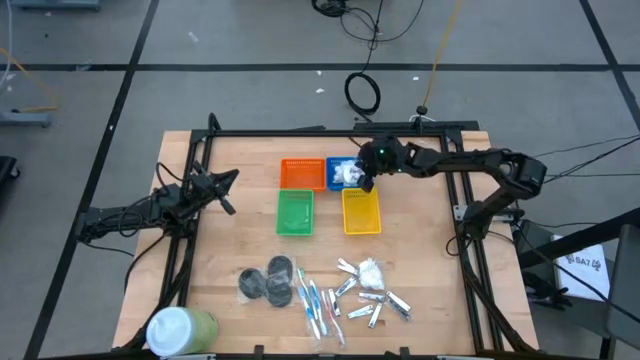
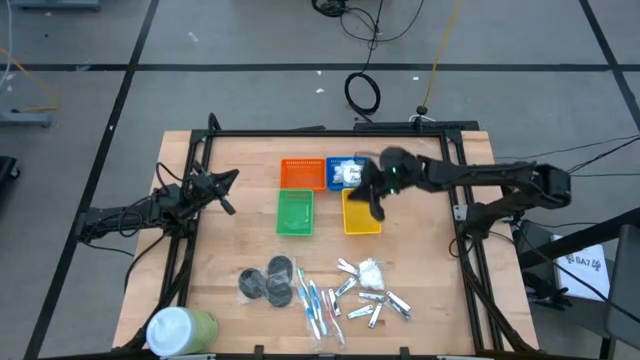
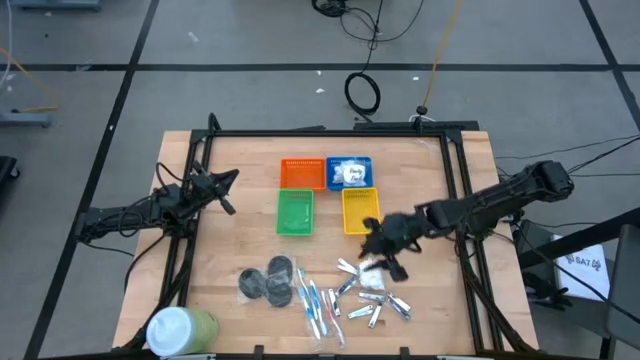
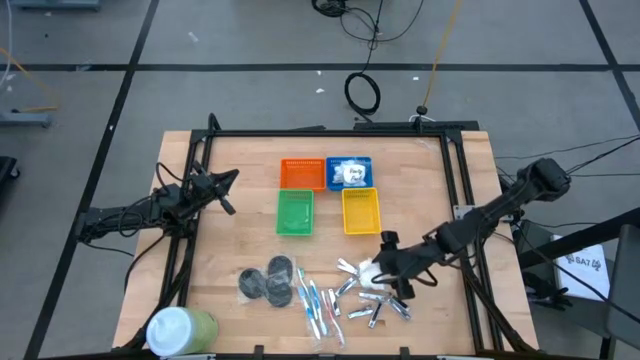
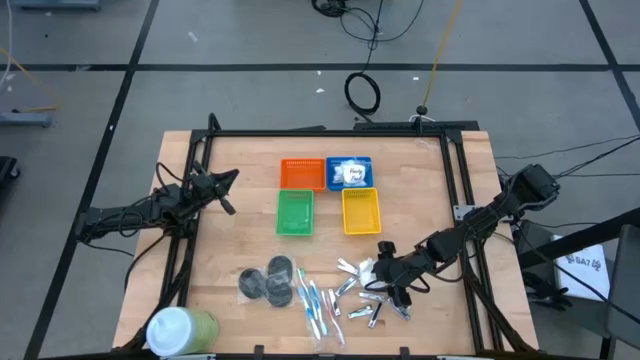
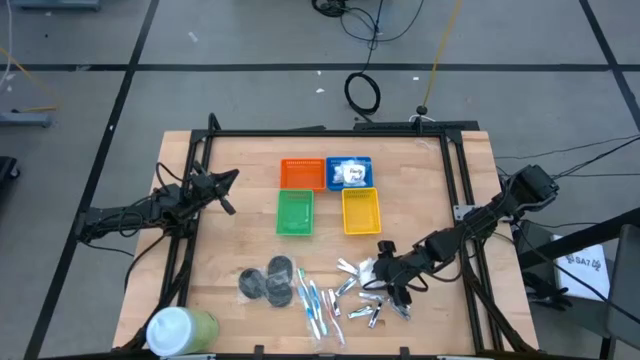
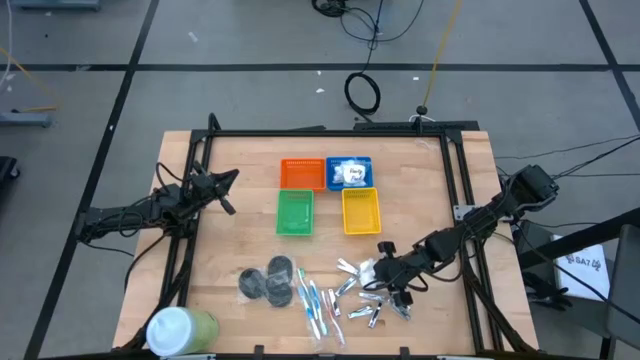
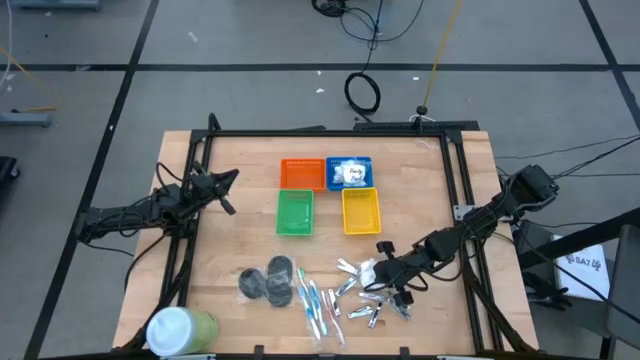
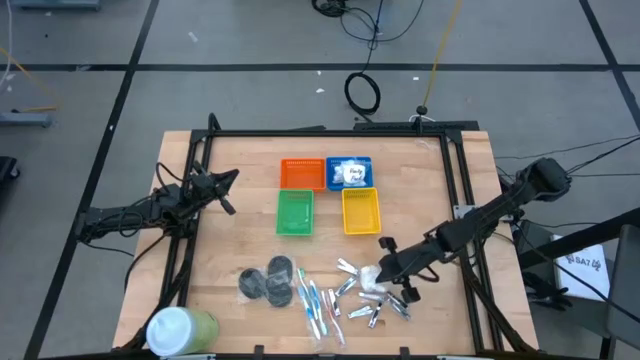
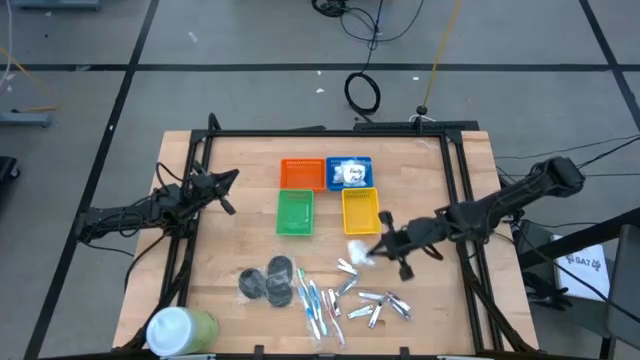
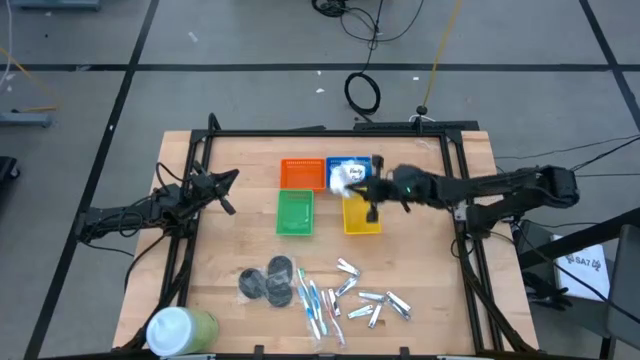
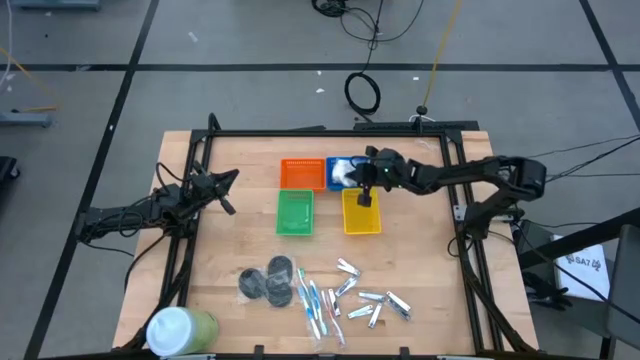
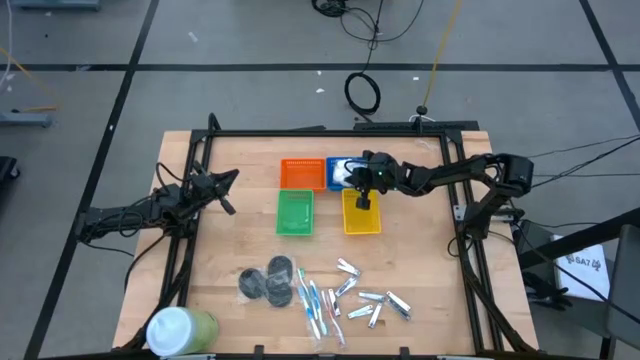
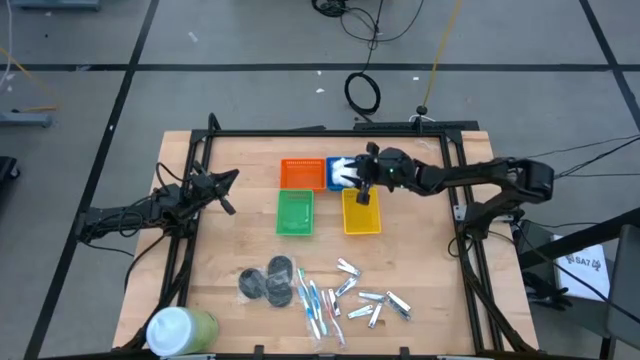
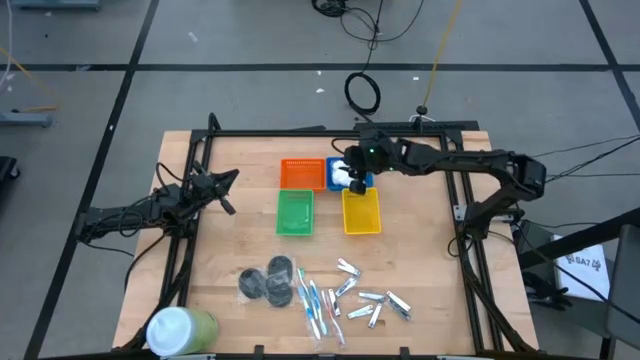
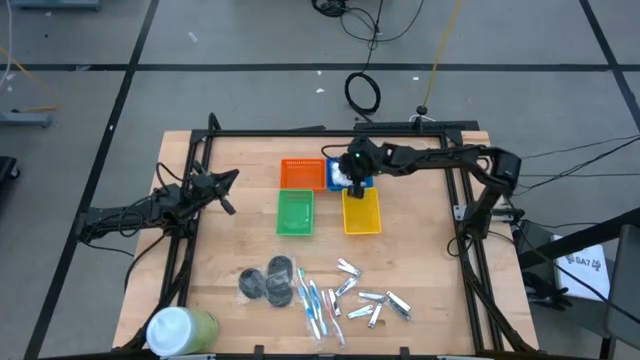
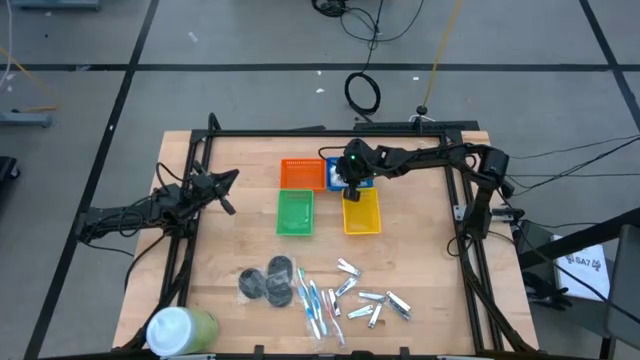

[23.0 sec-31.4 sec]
Task: Pick & Place Travel size toiletries
Put the white vanity pack into the blue bin

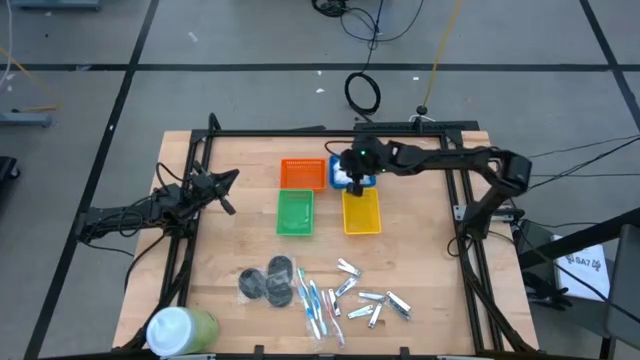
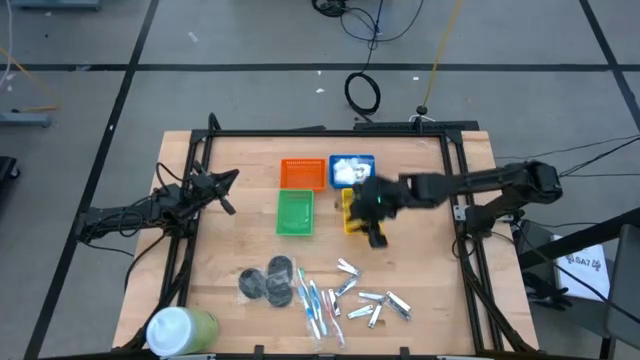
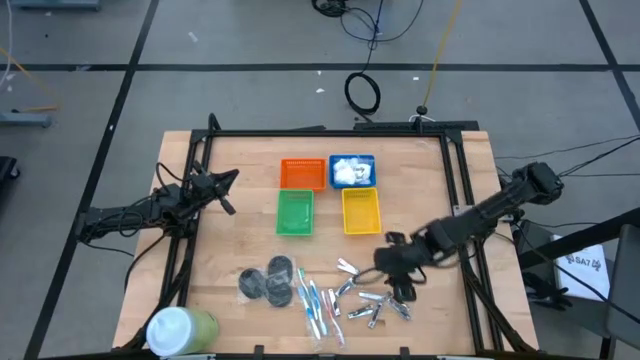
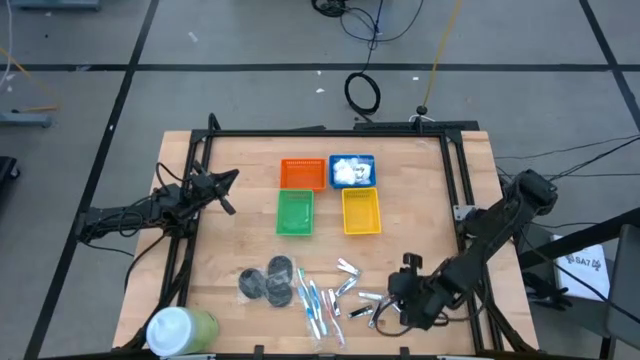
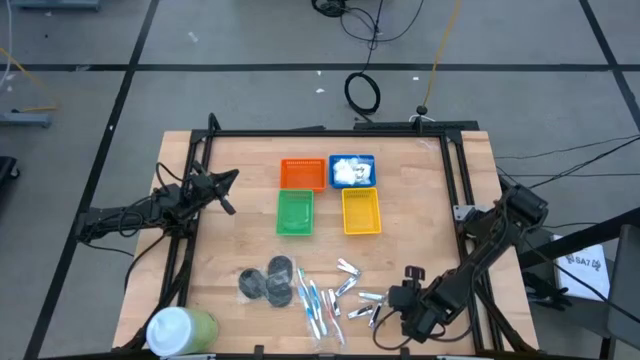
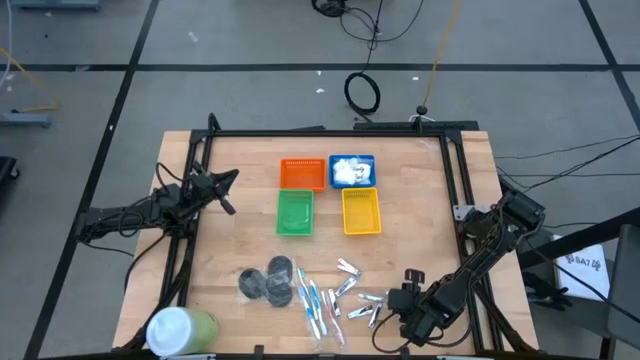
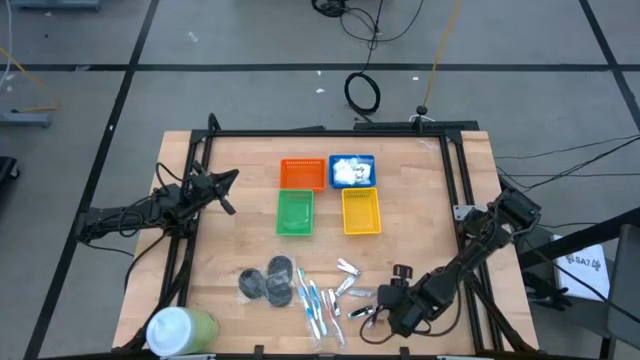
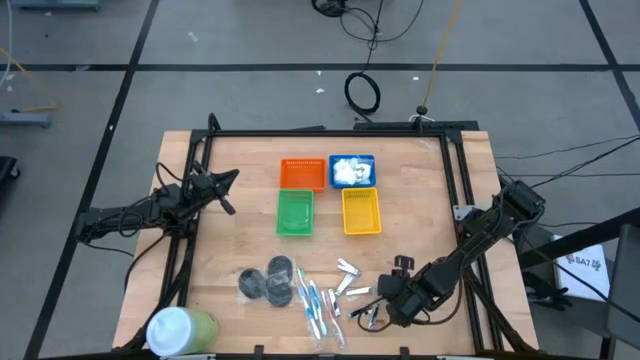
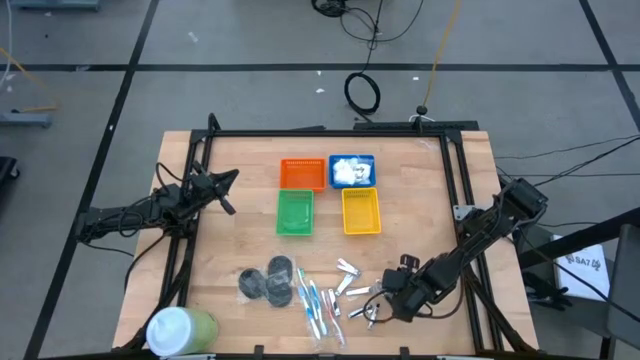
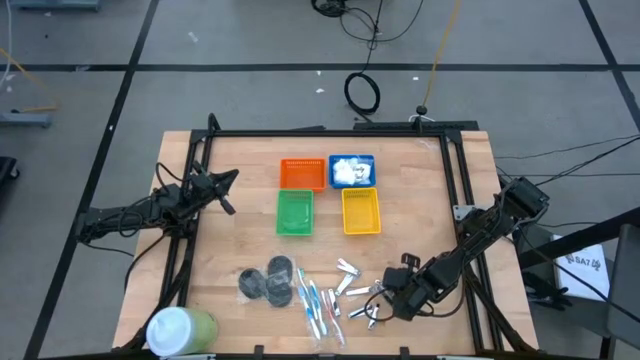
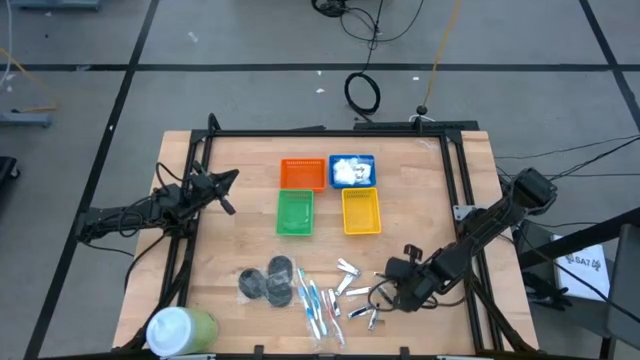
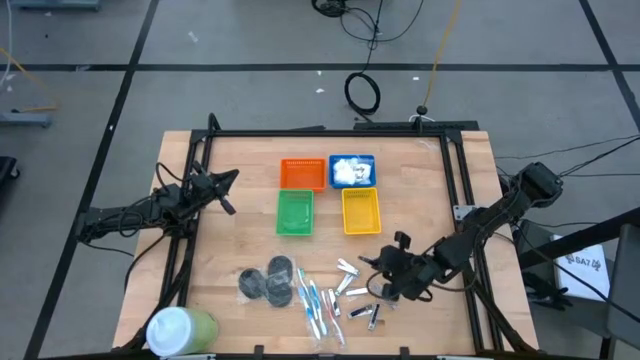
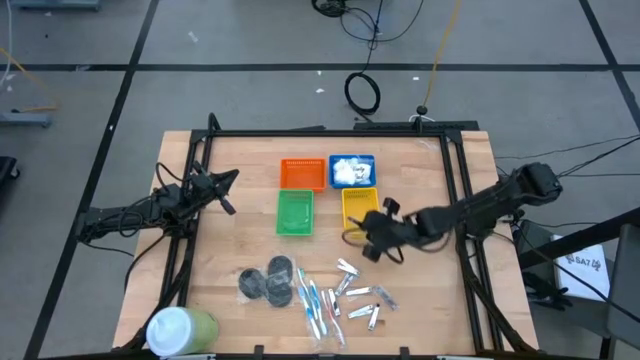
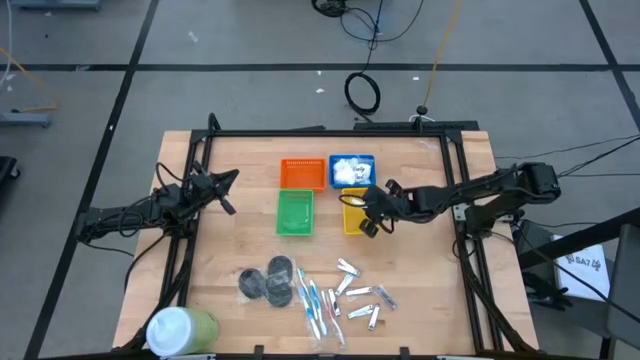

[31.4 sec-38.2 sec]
Put the silver nail cutter into the yellow bin

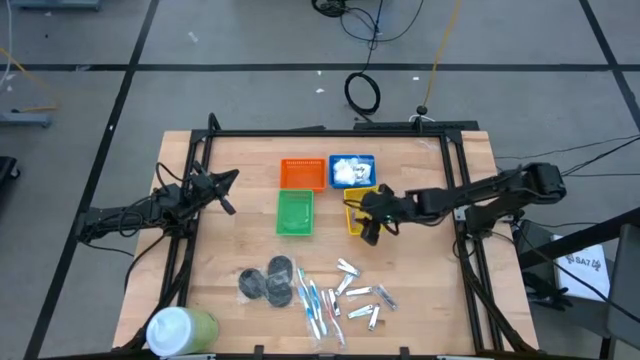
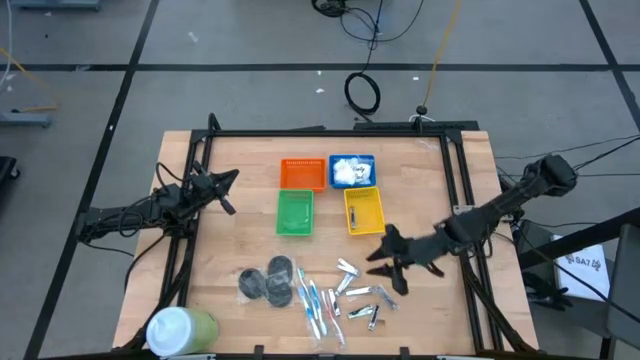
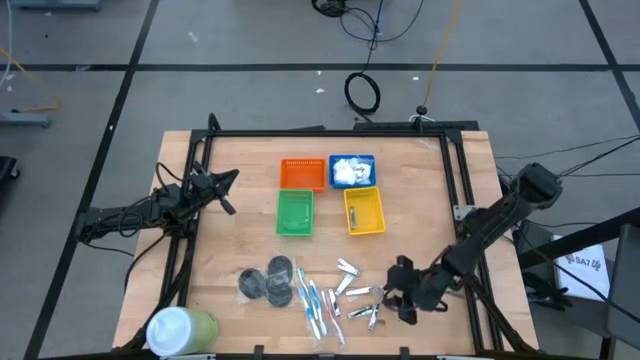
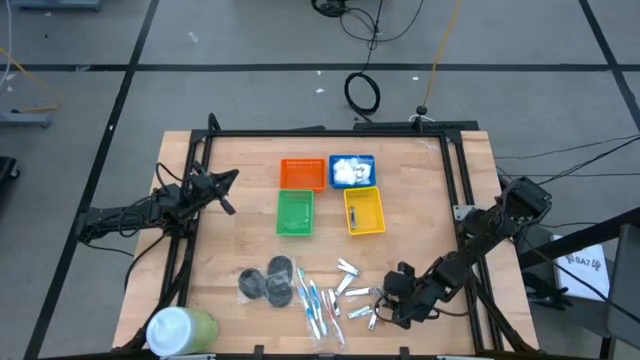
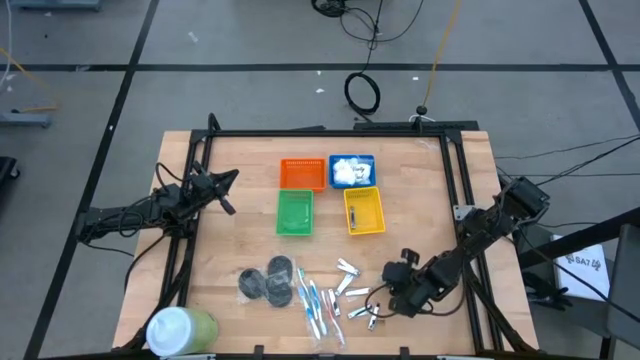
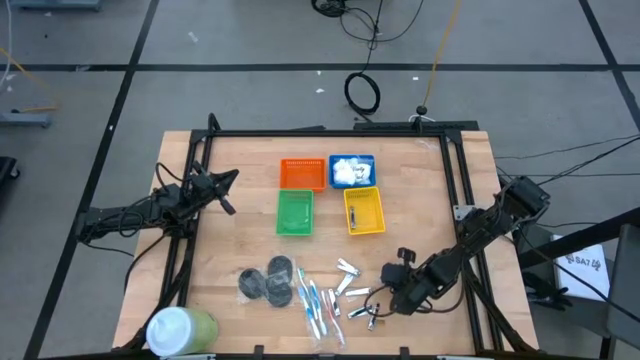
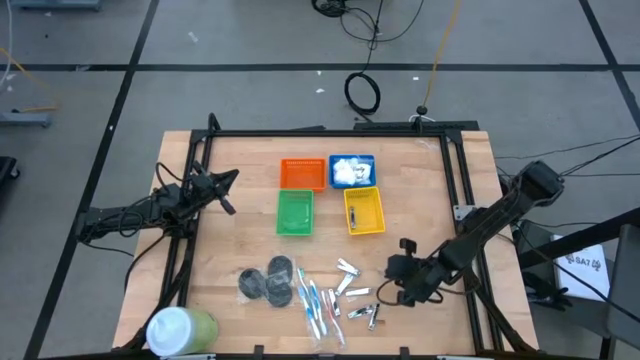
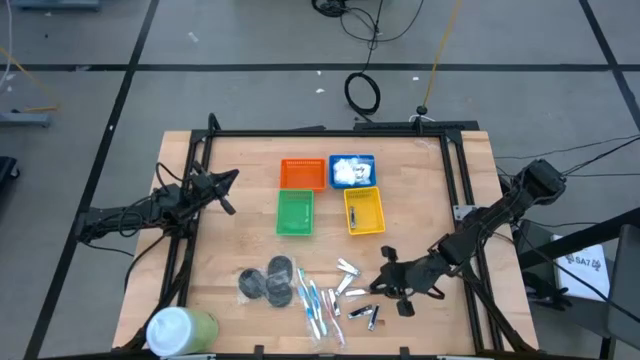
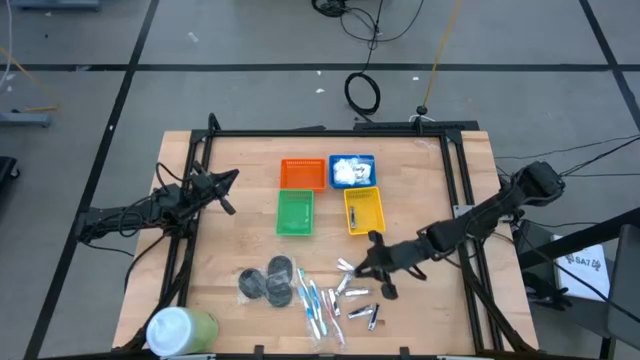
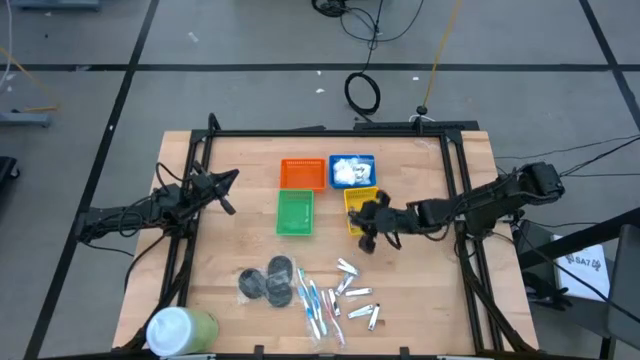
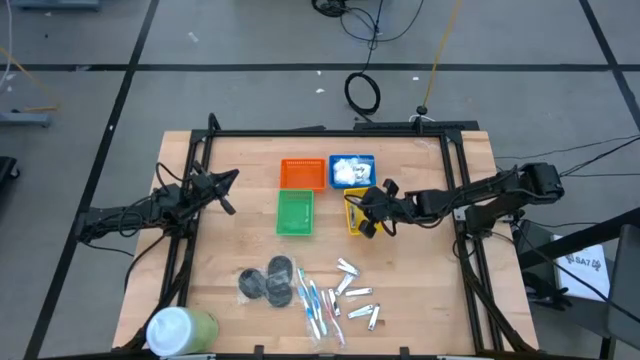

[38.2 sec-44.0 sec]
Put the silver nail cutter into the yellow bin

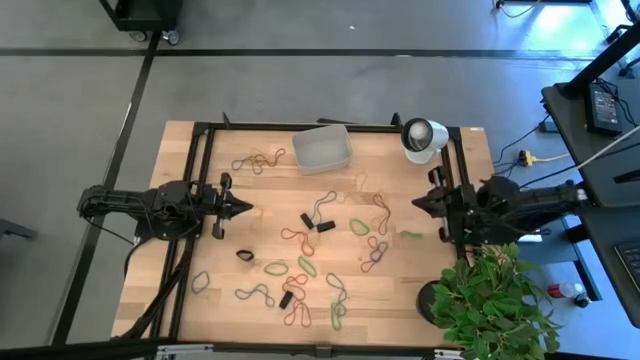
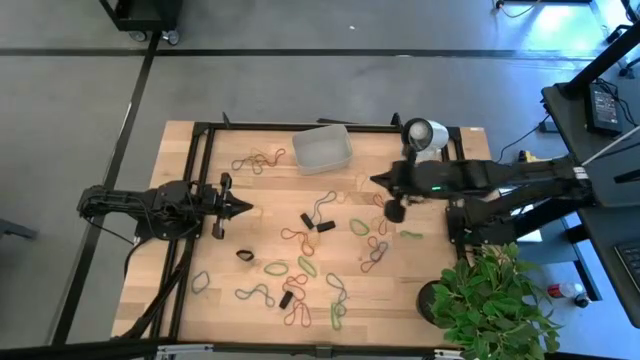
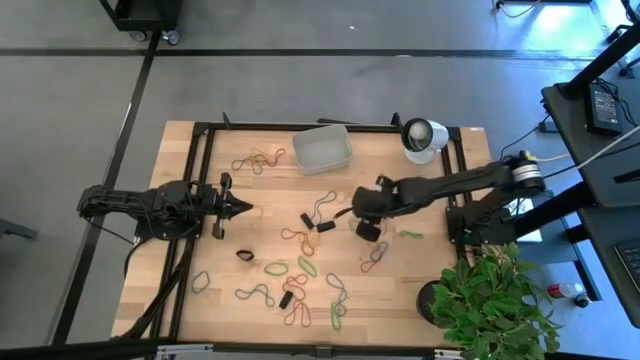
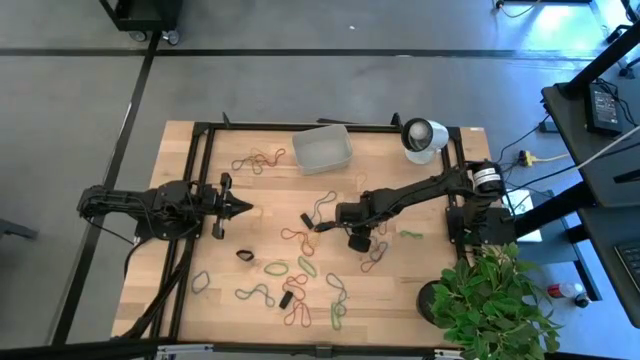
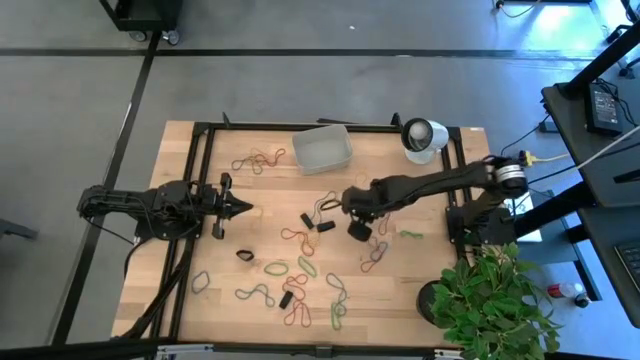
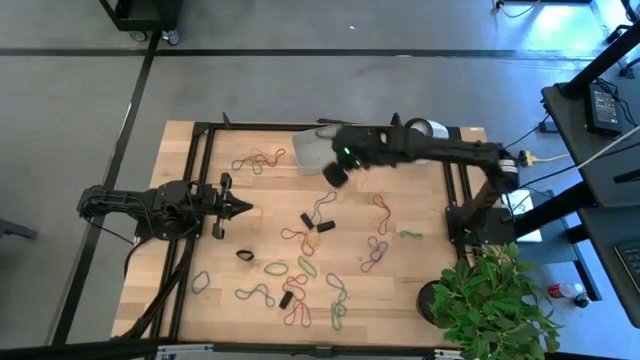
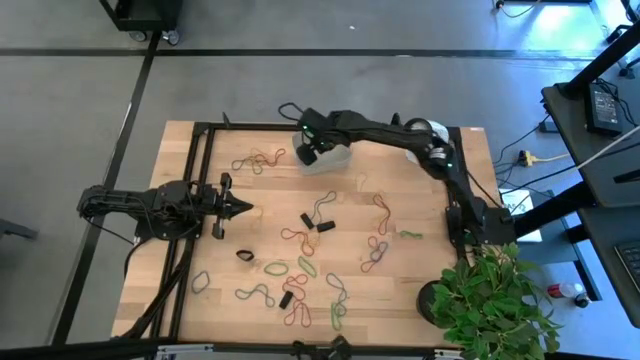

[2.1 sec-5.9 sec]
Task: Pick and place rubber bands into bin
Put the green rubber band into the gray bin
